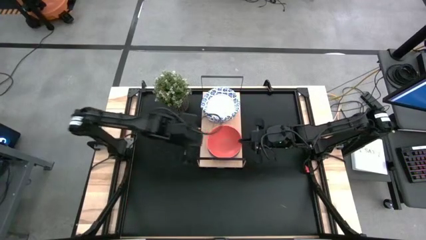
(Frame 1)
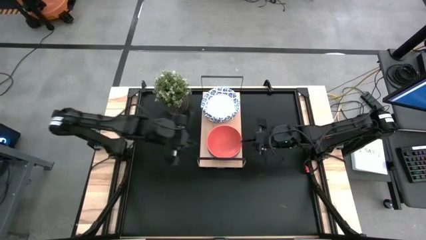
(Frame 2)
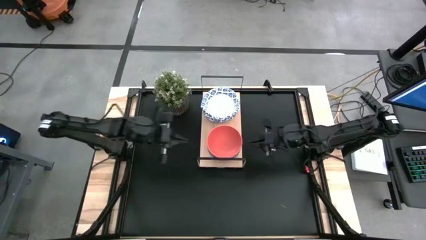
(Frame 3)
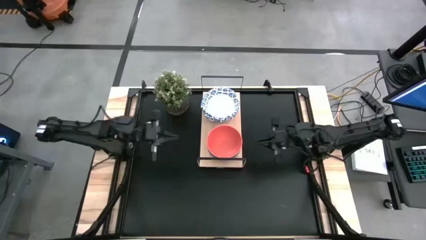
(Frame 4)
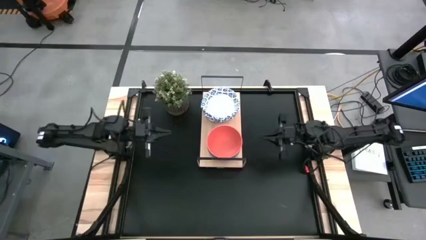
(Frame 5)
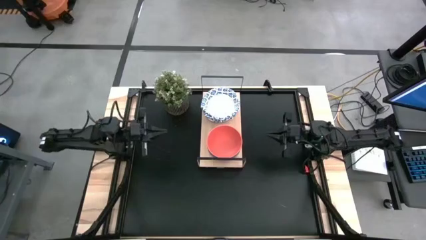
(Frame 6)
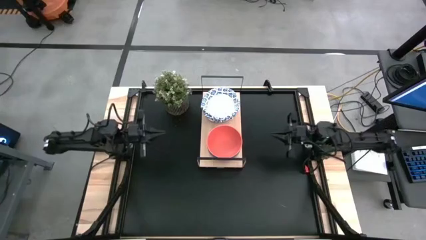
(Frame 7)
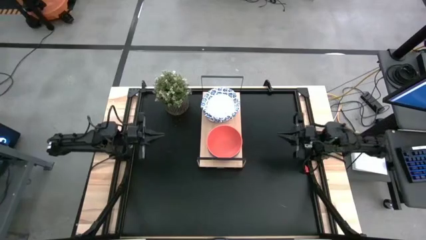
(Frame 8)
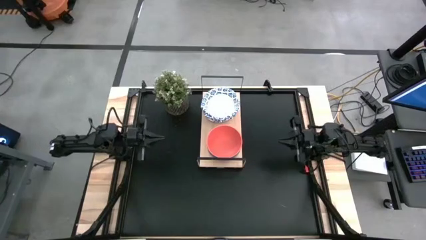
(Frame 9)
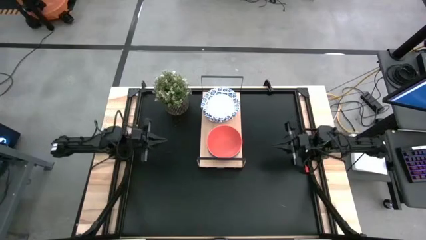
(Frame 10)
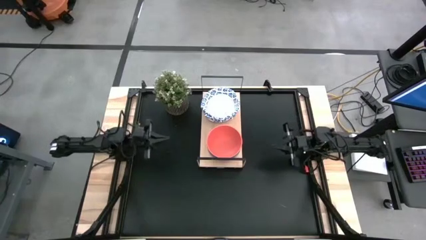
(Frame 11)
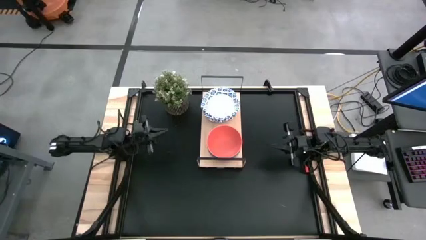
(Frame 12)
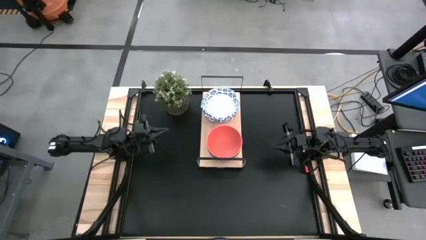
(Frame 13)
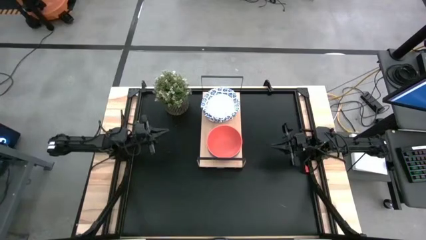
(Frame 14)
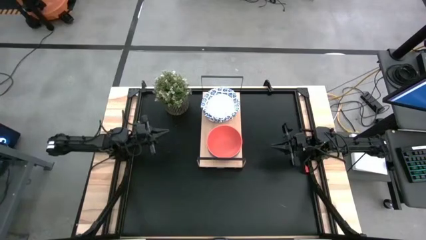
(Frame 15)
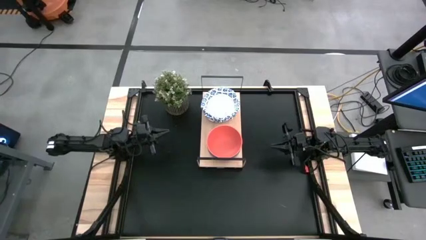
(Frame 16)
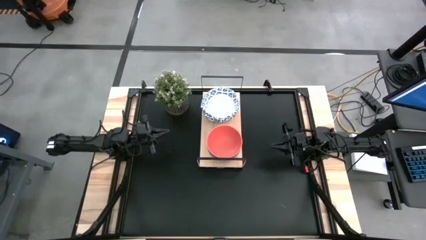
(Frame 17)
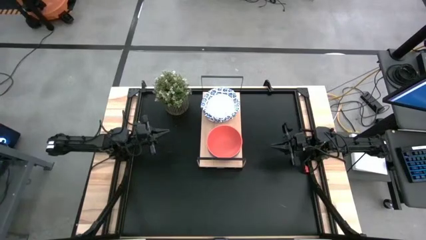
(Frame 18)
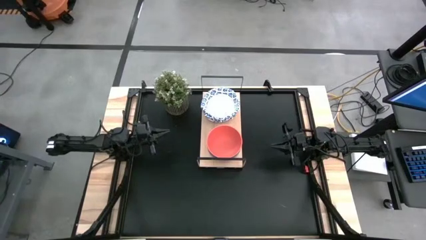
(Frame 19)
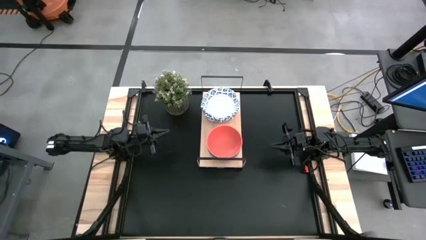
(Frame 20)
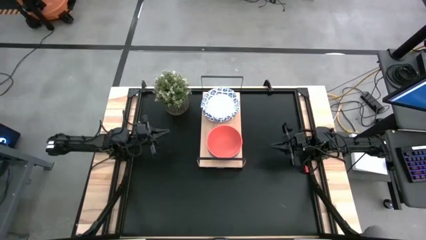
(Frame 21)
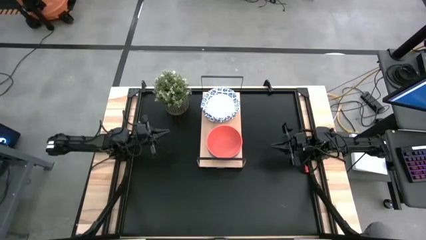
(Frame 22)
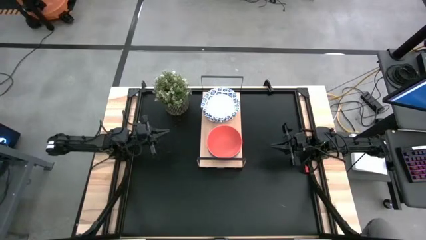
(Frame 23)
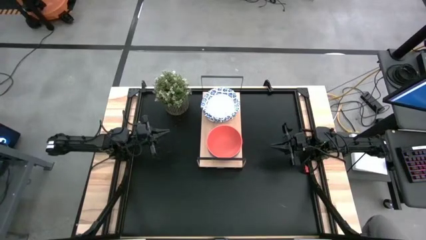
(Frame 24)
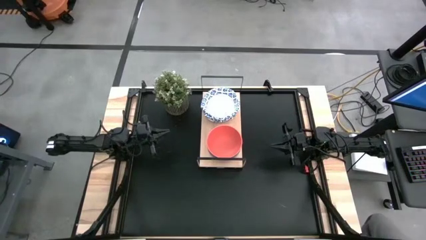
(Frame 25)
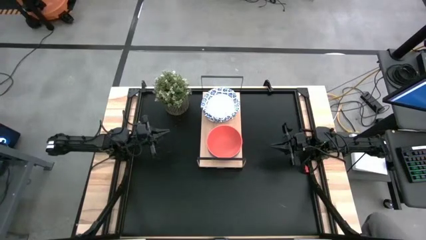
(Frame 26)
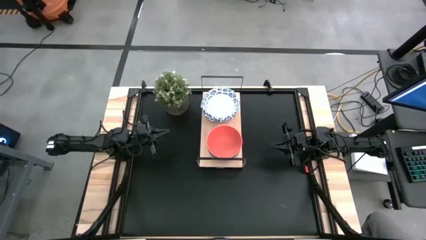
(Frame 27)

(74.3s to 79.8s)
Task: Place and stack bowls onto a shelf
Return to Home Position

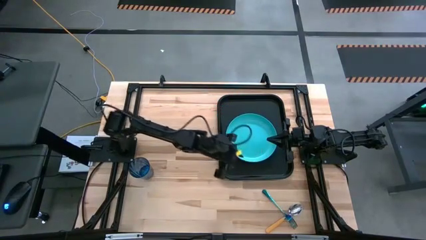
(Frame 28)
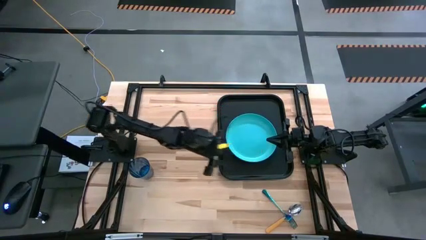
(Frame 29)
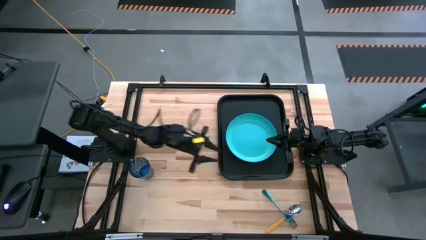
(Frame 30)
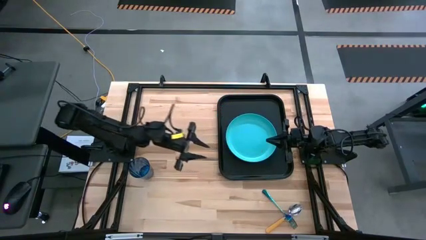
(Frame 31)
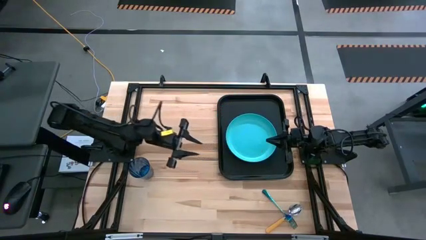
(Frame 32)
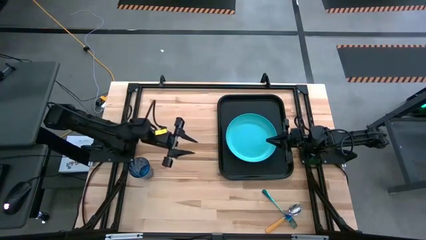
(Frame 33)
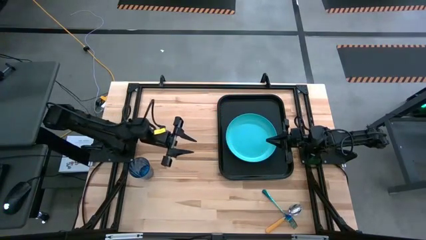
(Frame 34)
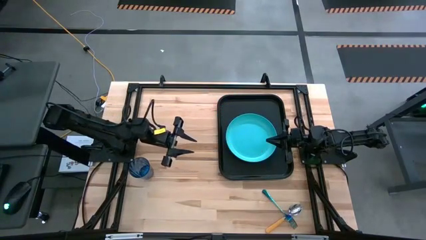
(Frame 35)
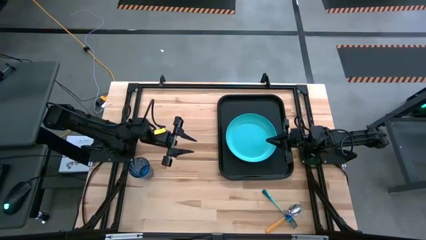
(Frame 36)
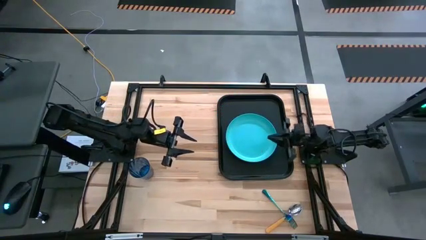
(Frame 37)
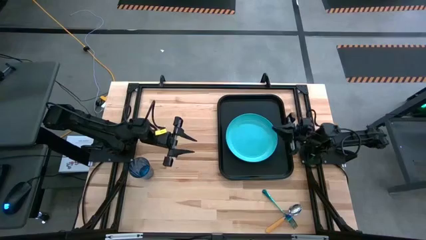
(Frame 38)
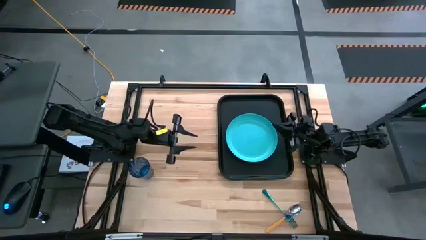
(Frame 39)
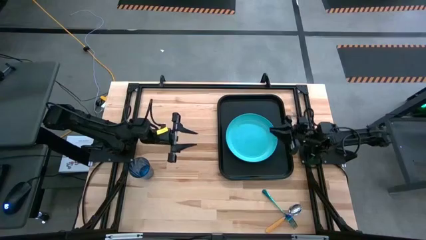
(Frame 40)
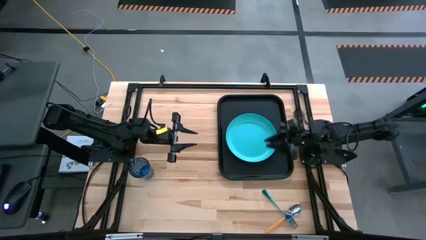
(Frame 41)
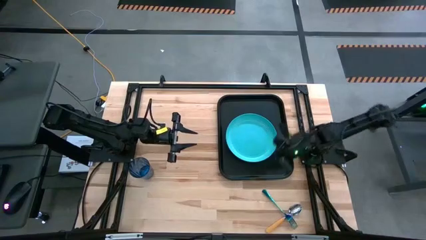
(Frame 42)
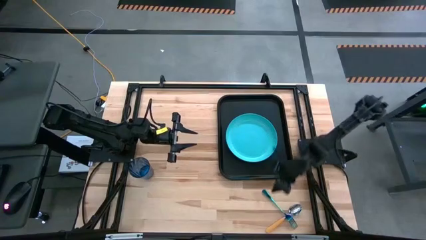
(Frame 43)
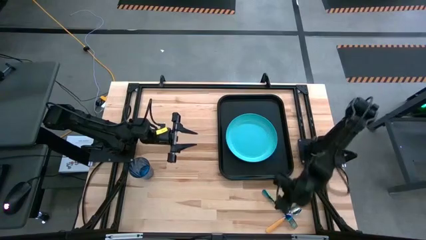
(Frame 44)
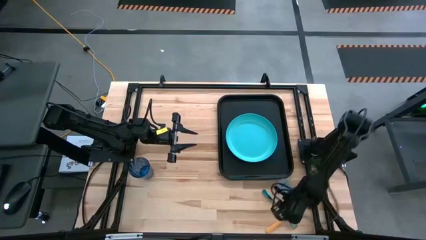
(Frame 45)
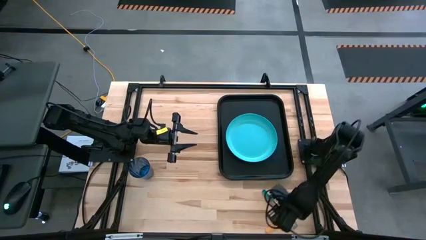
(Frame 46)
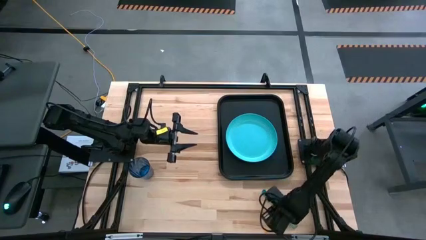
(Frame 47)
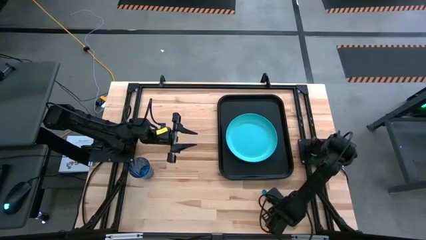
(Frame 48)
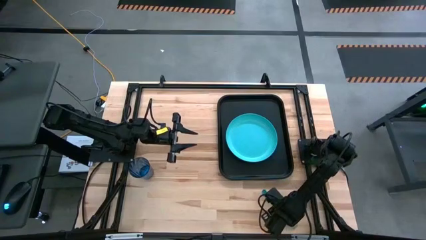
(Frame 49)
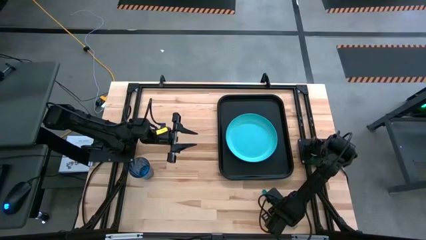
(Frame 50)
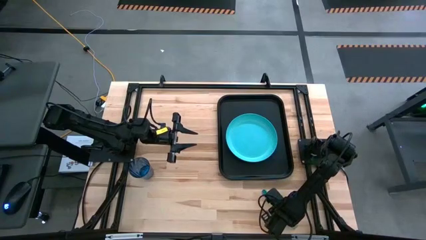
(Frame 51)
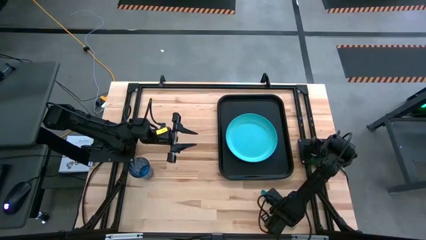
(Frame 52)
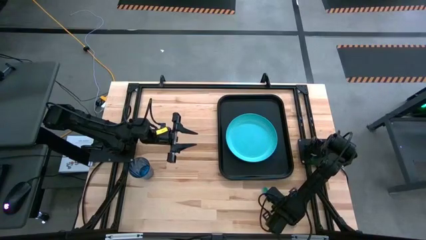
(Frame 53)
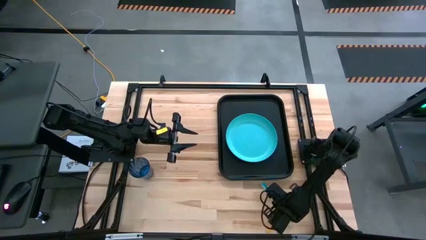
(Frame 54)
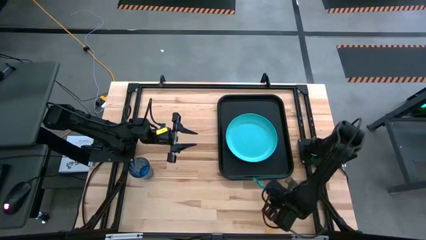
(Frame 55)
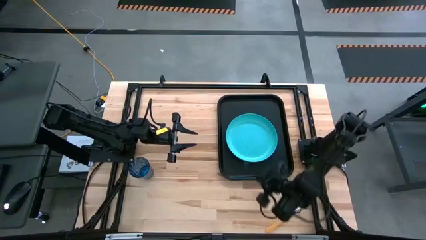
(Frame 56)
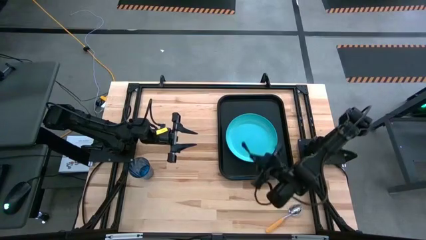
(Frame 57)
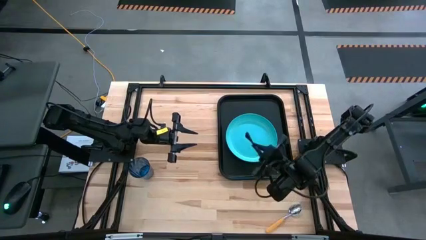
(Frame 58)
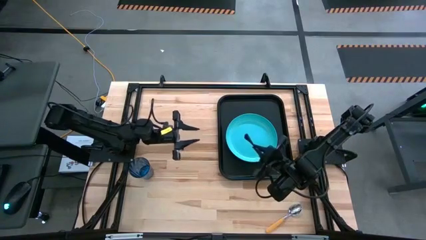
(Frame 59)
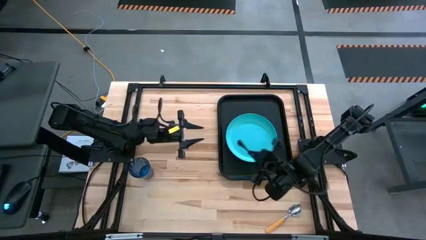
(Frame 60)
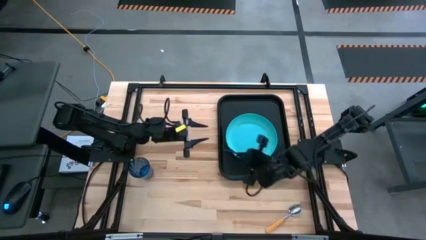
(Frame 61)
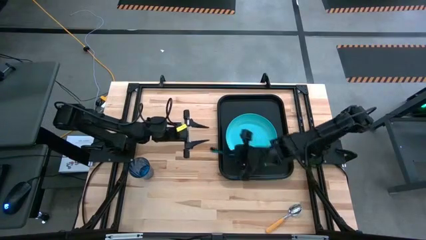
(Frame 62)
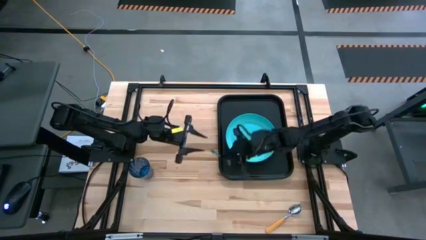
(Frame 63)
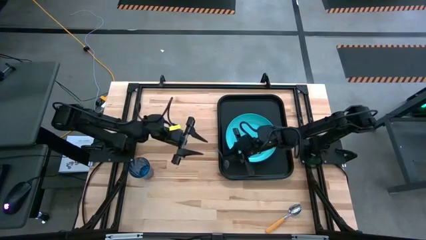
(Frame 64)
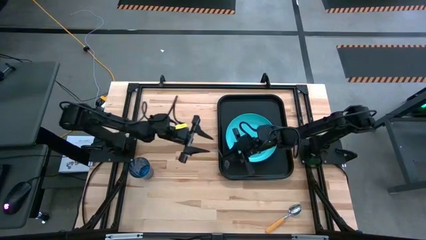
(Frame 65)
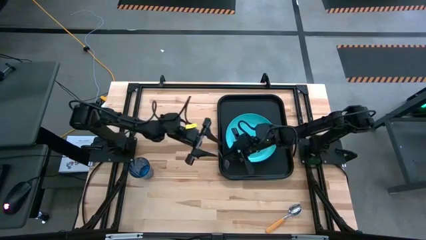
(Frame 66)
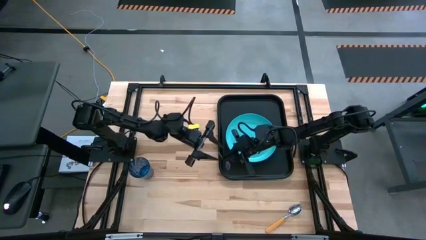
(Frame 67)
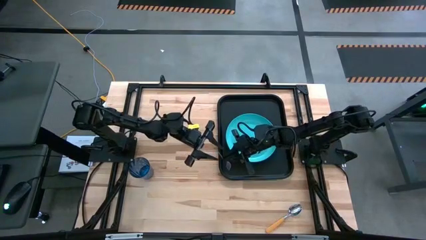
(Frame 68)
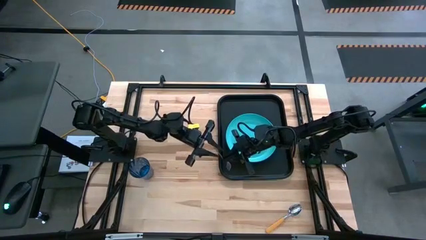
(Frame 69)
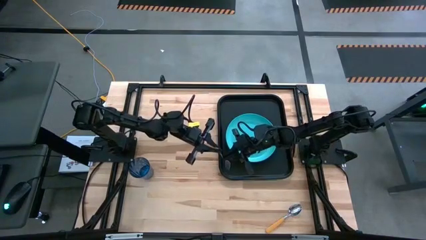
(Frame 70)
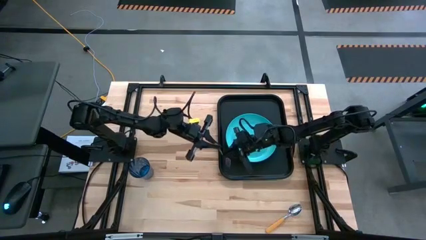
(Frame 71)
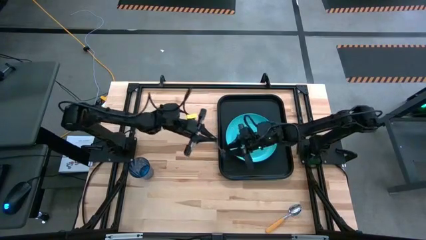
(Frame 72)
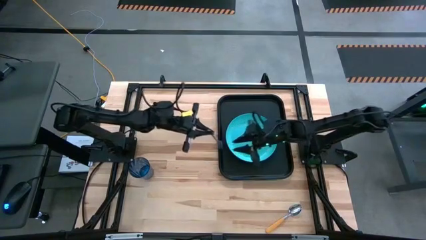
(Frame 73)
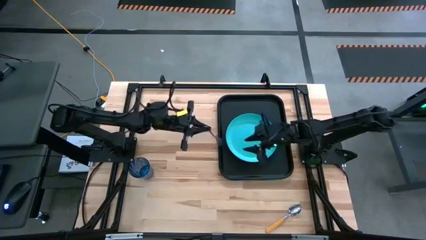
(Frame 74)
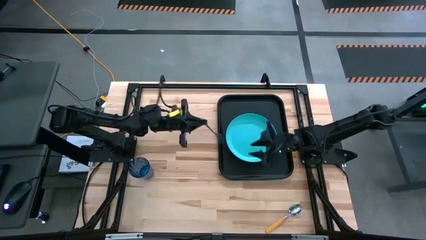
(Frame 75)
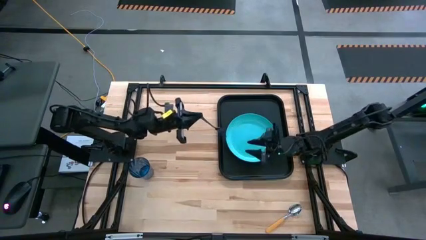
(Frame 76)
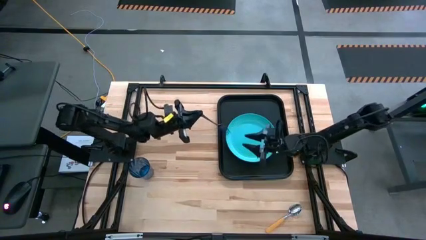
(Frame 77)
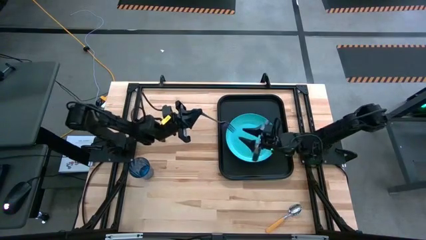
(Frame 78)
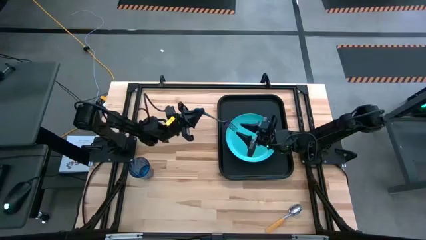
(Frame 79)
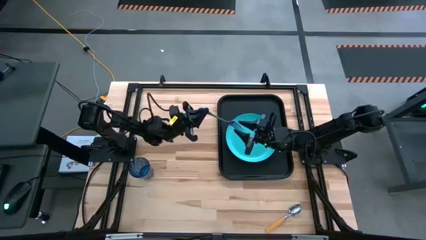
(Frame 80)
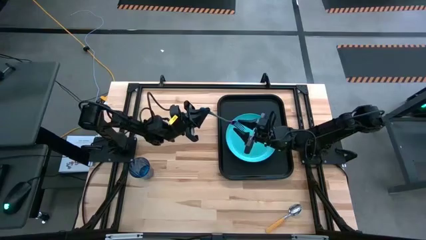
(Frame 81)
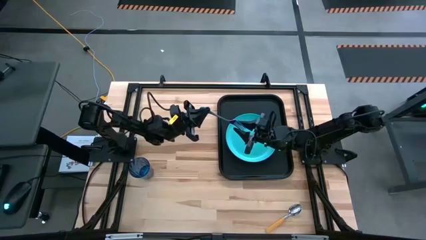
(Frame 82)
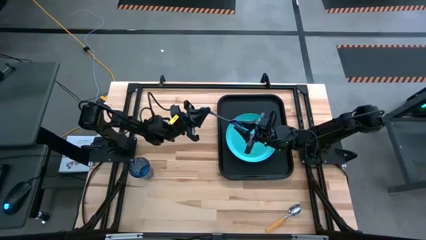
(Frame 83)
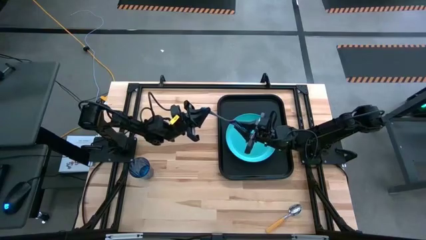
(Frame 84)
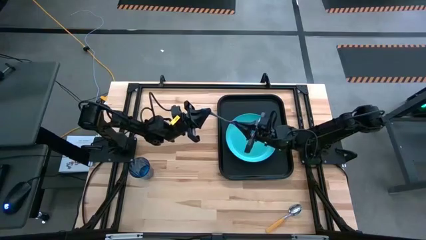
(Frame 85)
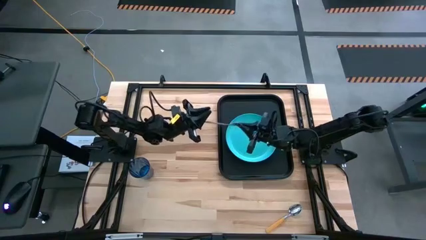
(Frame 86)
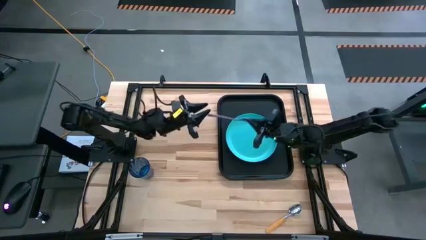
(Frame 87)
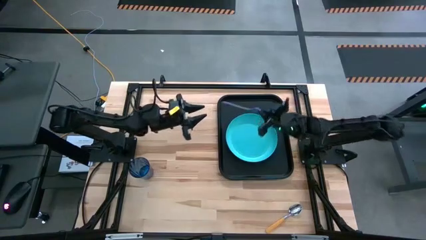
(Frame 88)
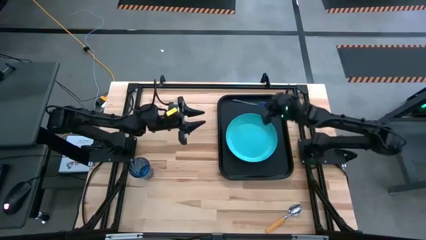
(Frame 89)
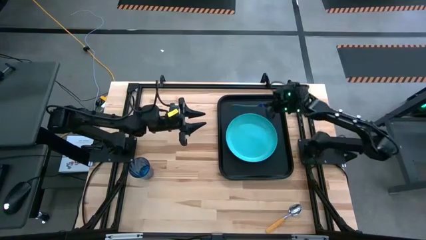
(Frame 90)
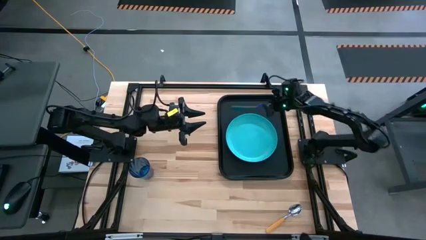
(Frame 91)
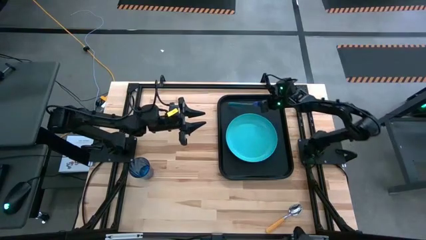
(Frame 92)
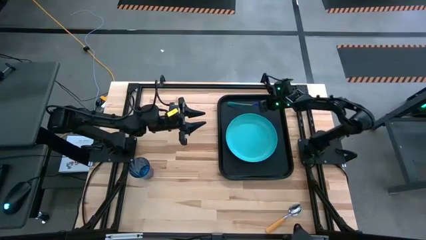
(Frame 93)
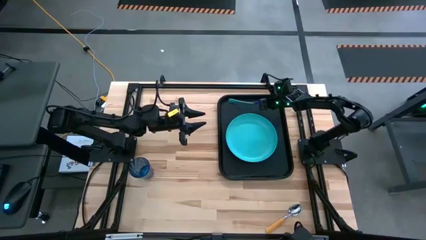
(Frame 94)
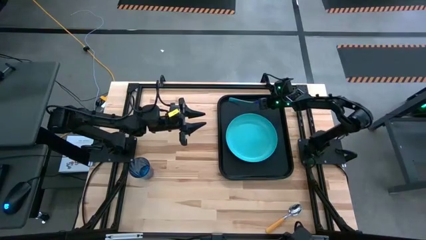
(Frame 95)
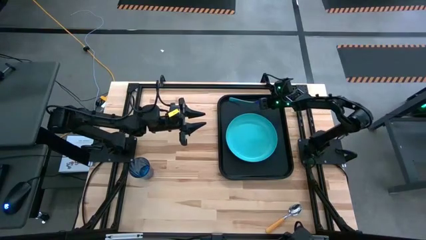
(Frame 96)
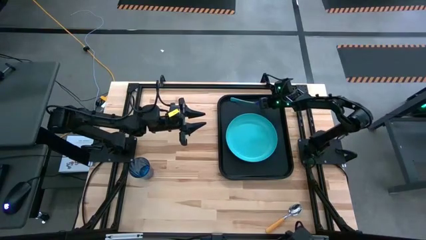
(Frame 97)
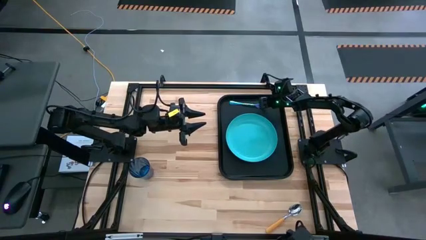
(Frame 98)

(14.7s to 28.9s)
Task: Pick and place plate/cup/fork/spoon on tray
Put the blue fork on the black serving tray to the left side of the blue plate
